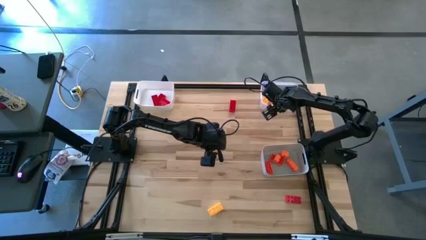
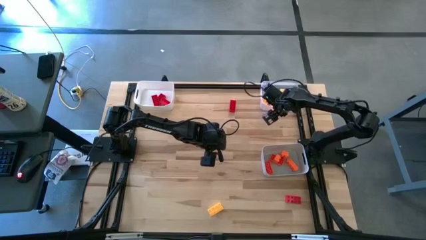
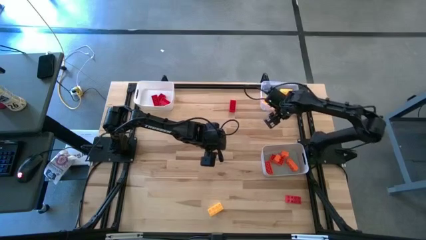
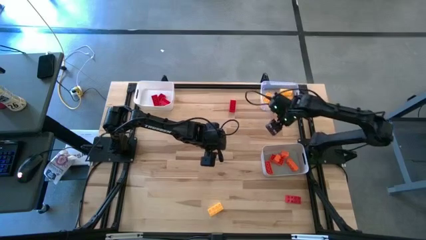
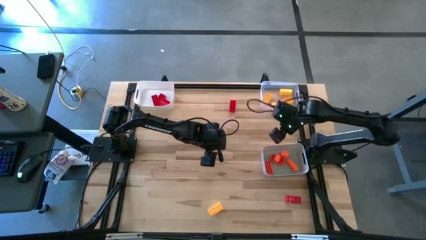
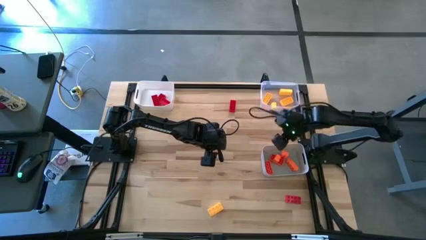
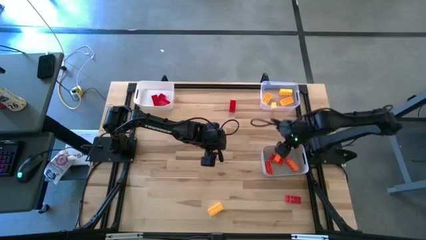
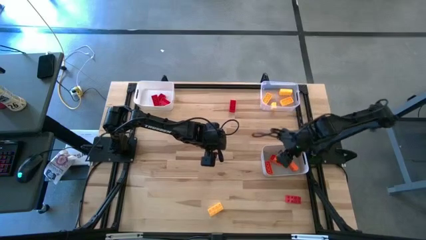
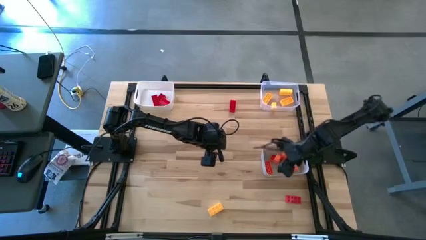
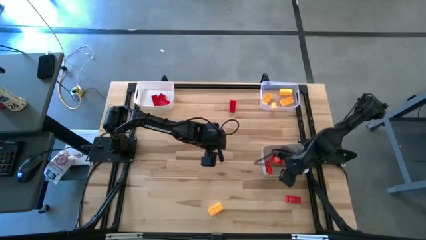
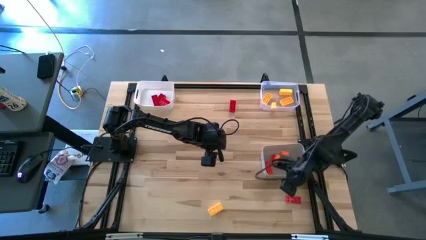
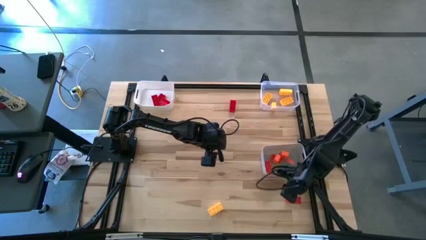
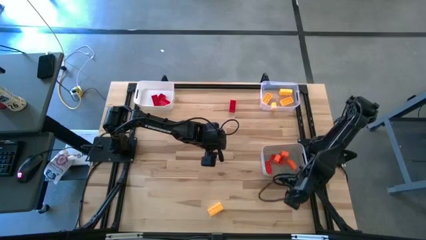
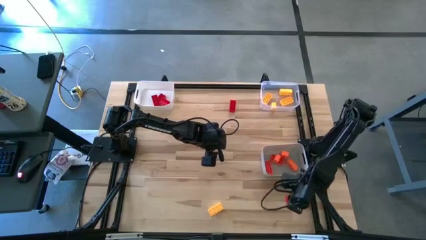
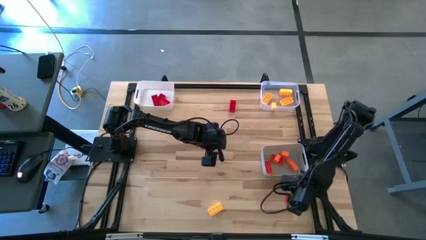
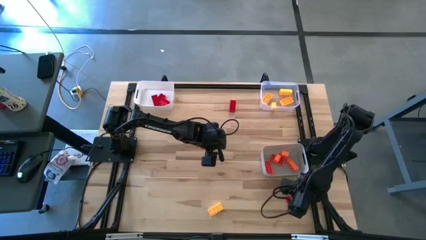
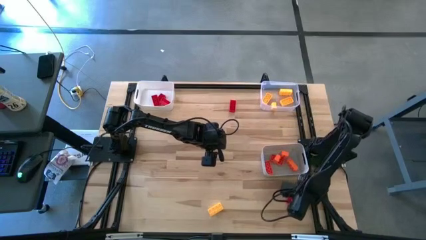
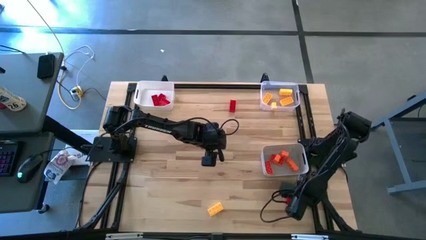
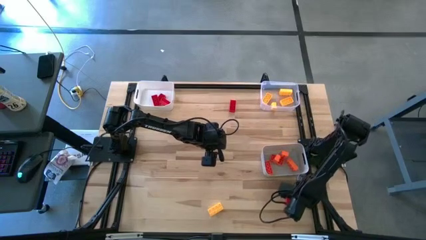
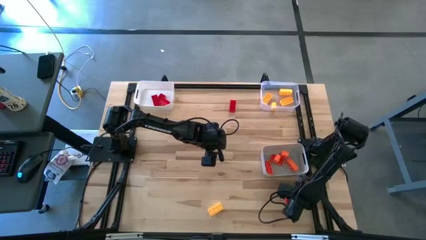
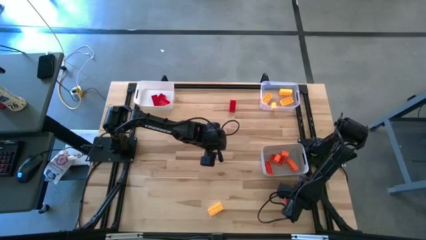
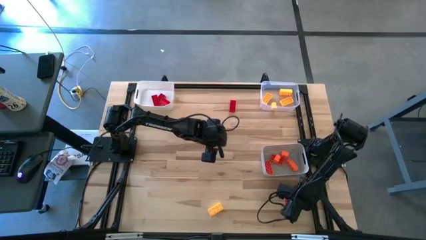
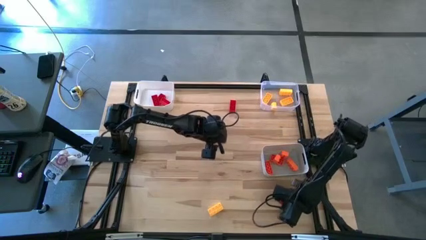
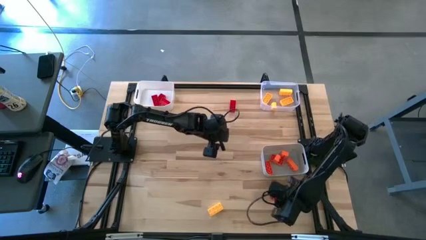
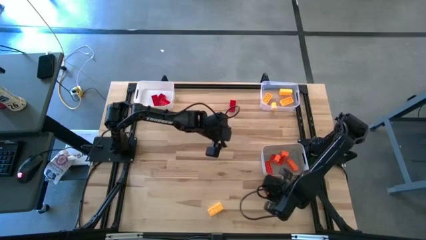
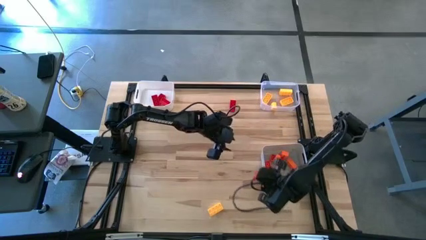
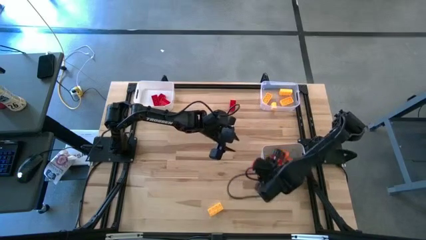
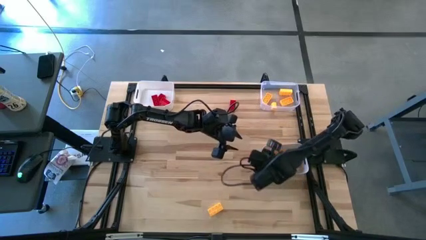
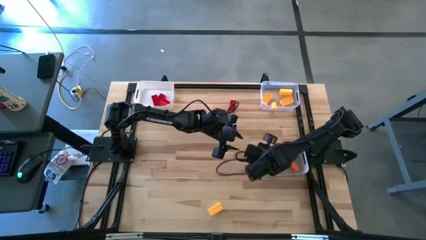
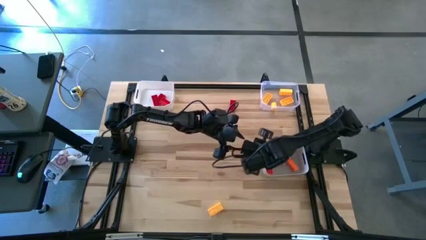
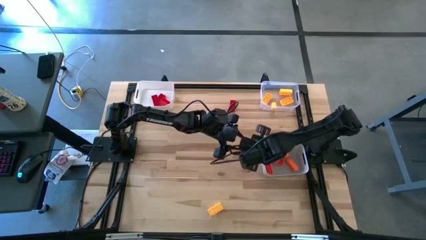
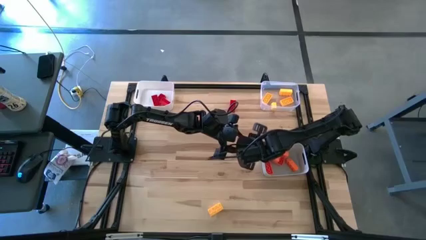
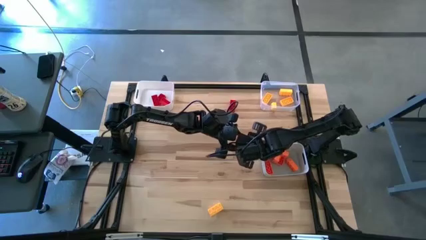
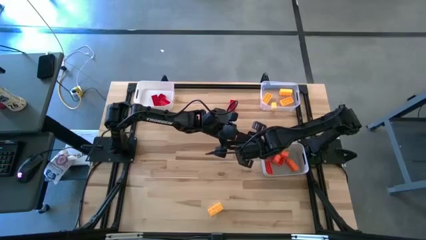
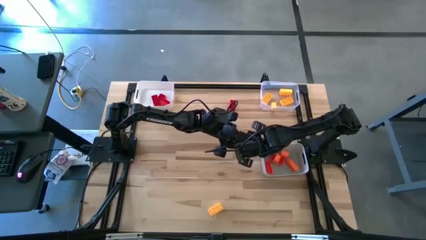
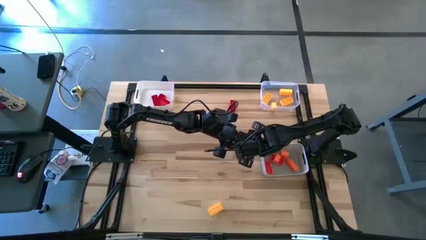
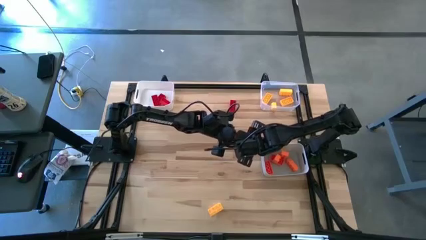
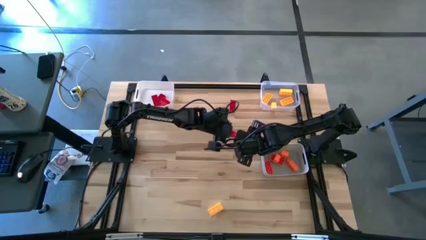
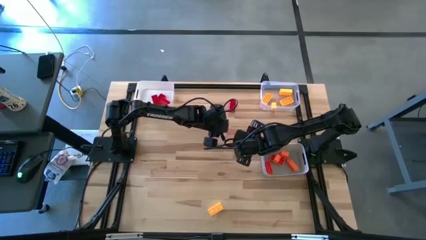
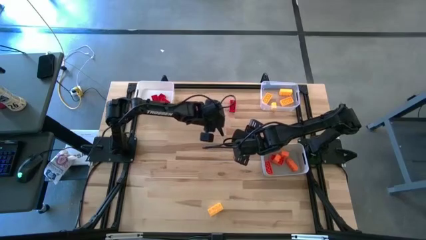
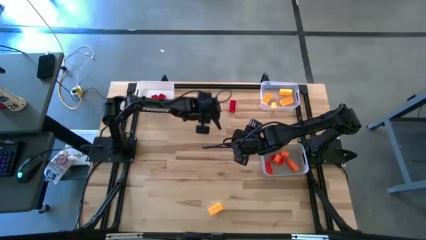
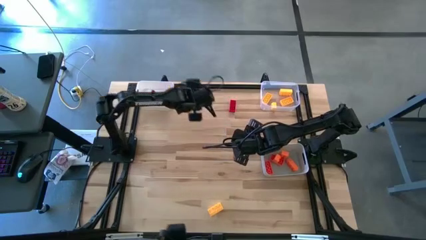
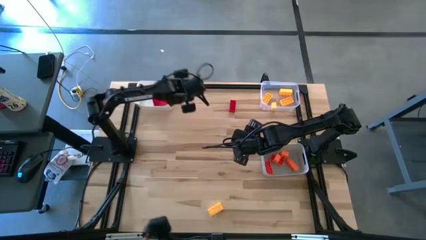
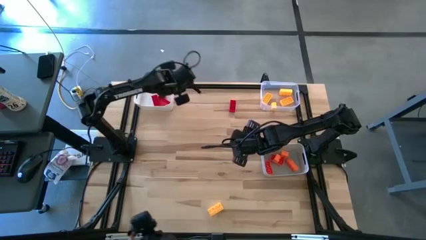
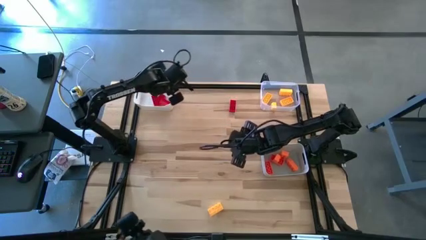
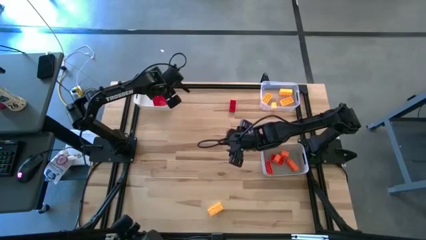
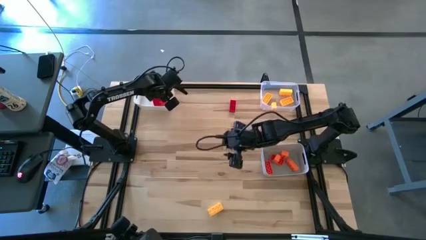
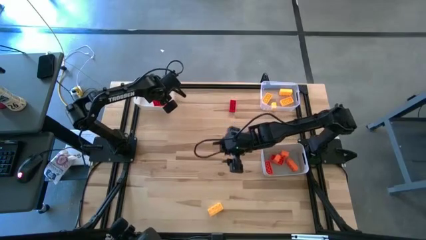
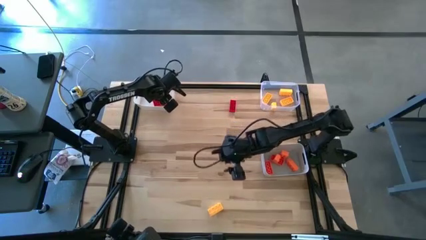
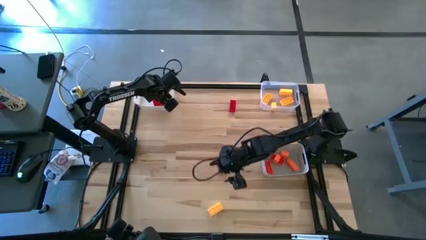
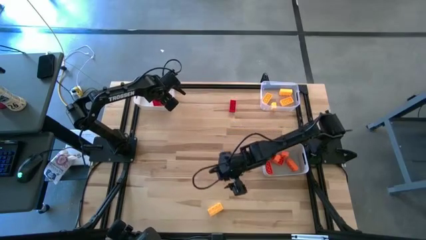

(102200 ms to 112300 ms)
Task: Sort & place blocks by color
Put the red game piece into the white bin

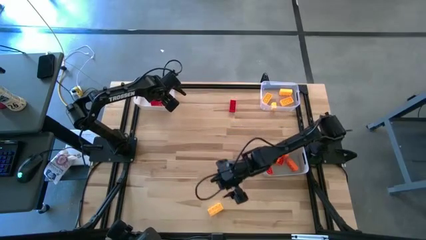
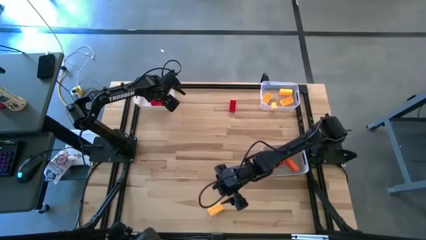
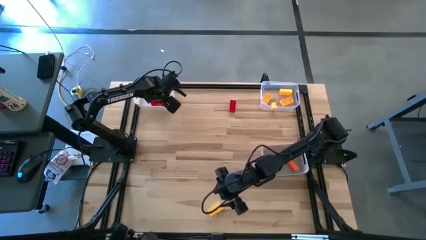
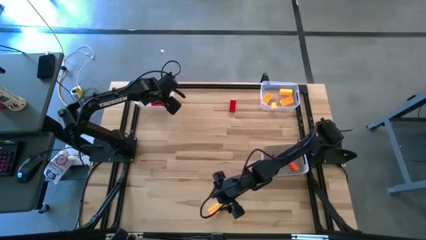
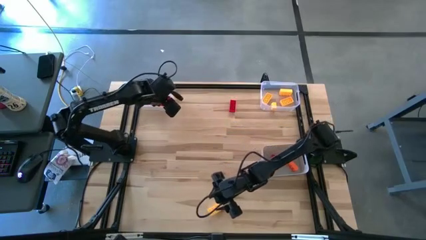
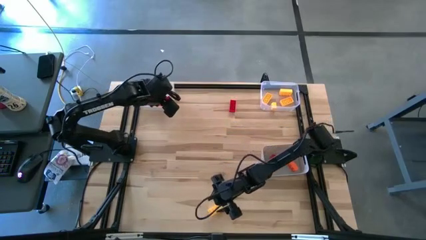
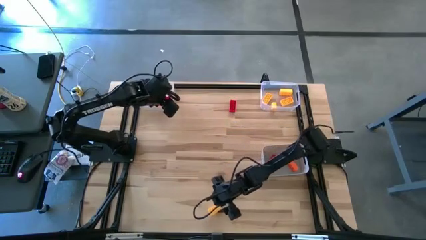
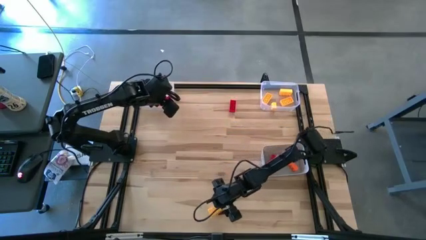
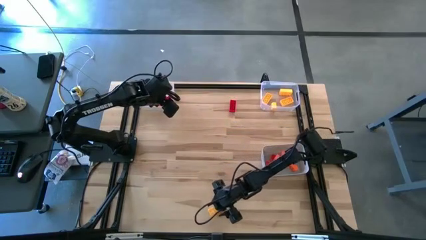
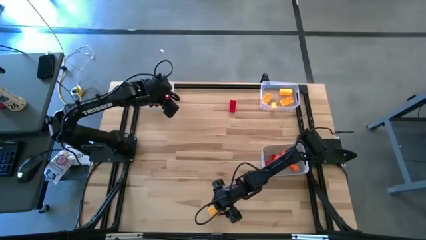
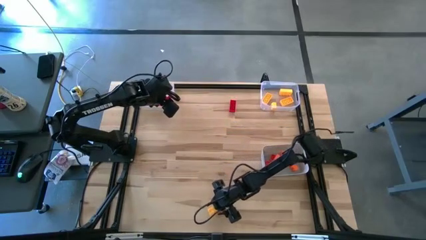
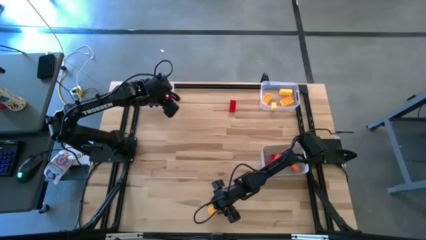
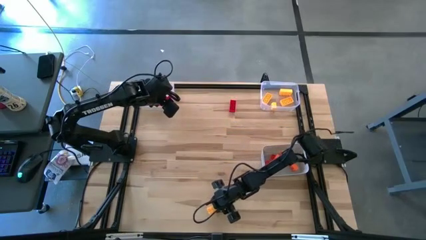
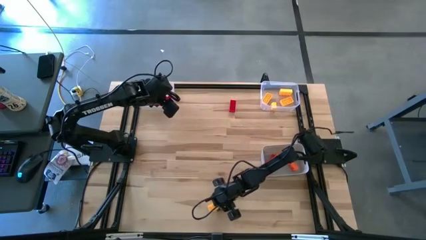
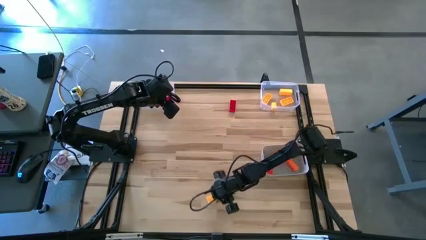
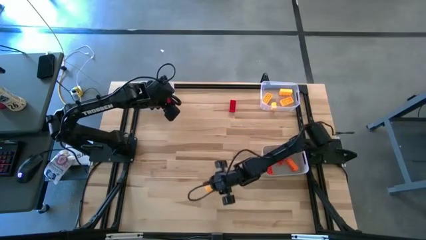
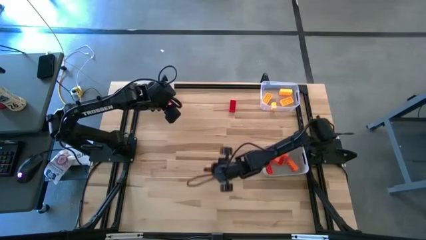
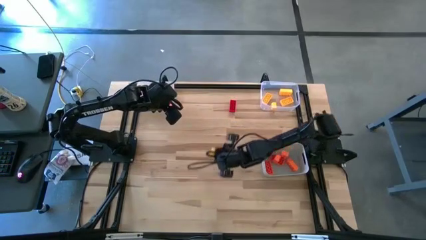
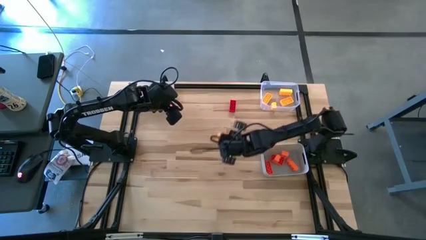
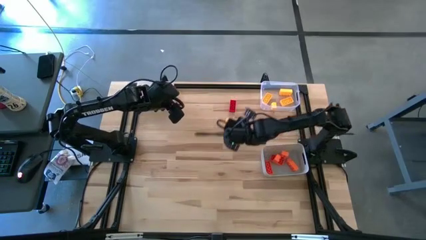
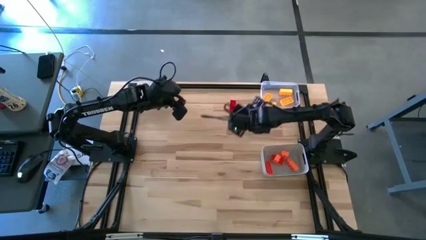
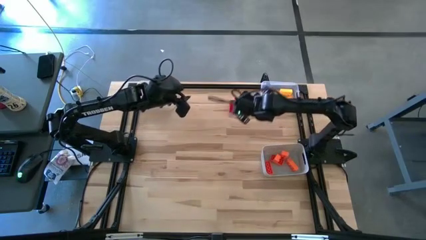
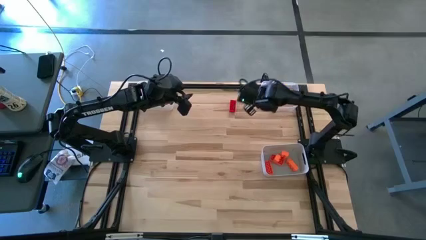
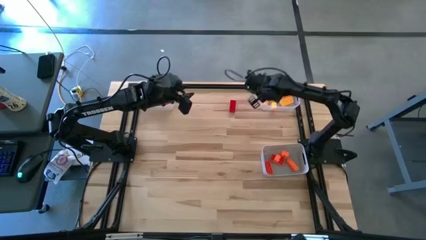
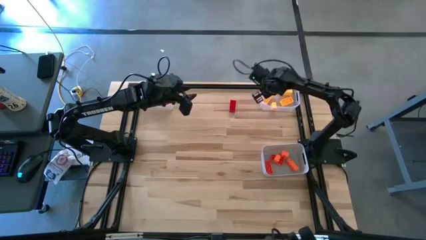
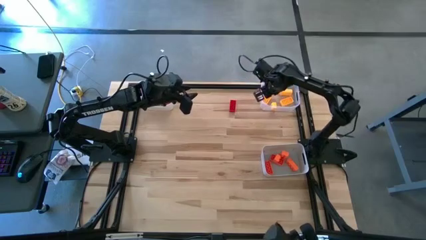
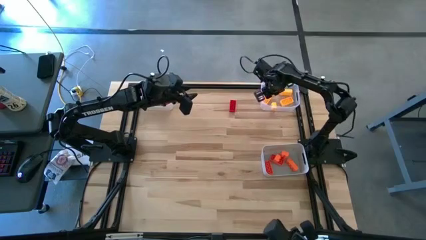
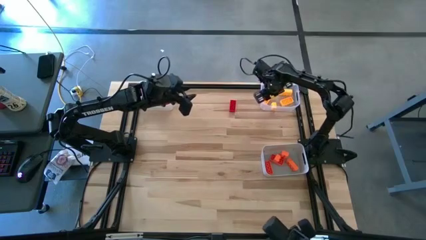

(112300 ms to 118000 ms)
Put the yellow game piece into the transparent bin
